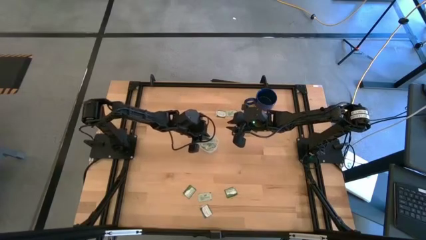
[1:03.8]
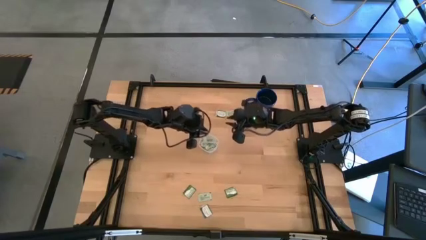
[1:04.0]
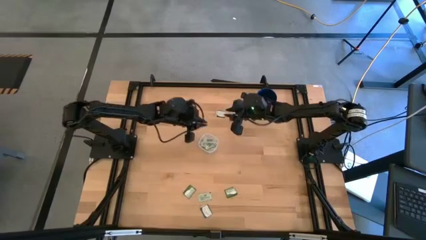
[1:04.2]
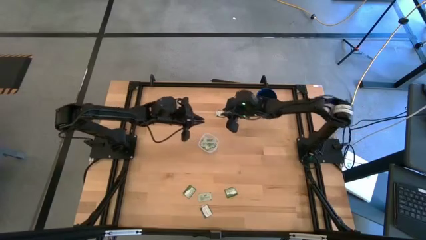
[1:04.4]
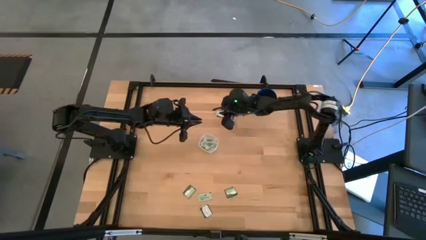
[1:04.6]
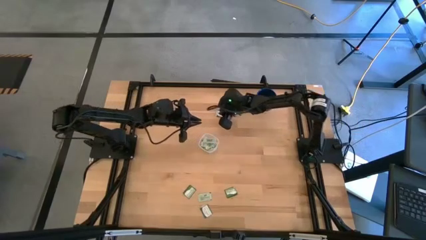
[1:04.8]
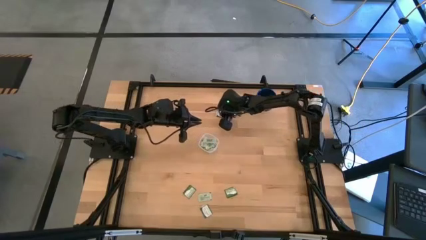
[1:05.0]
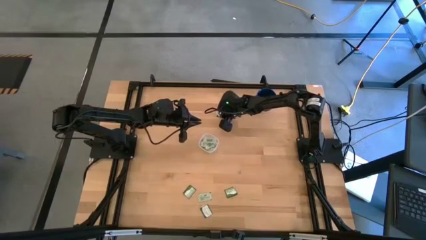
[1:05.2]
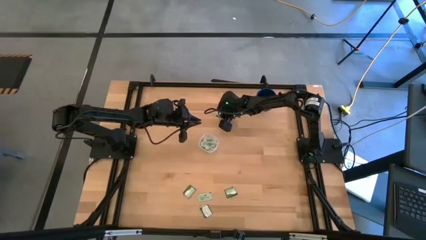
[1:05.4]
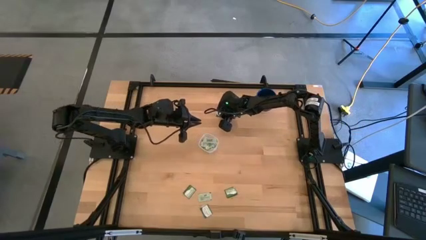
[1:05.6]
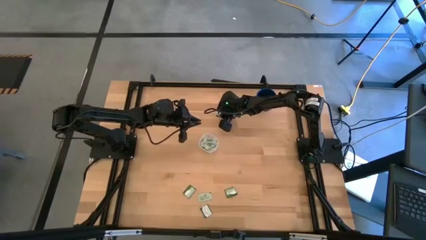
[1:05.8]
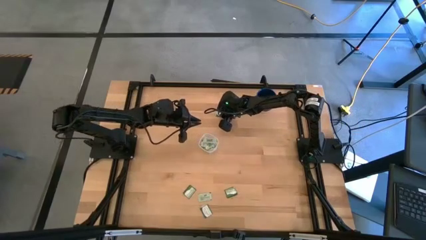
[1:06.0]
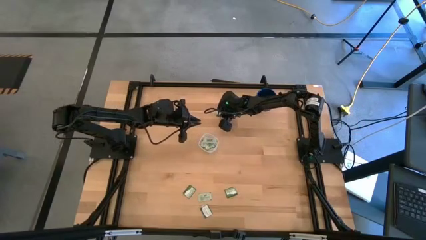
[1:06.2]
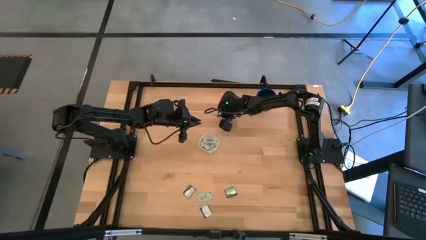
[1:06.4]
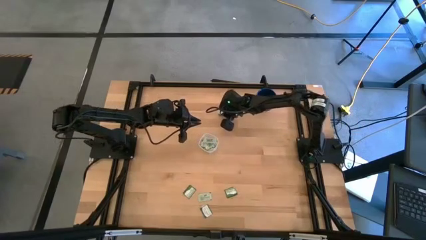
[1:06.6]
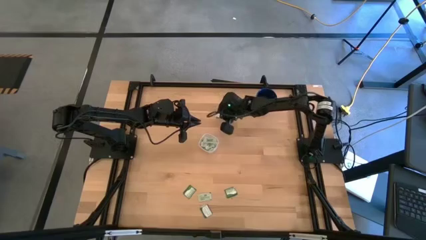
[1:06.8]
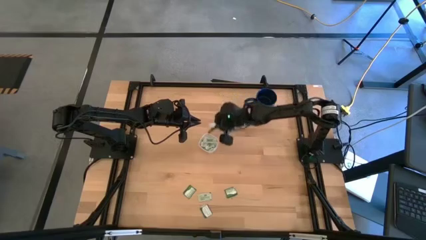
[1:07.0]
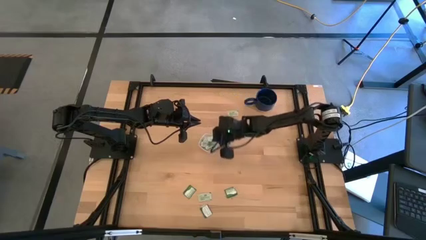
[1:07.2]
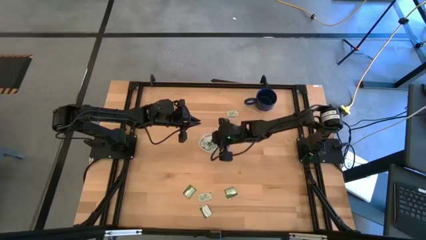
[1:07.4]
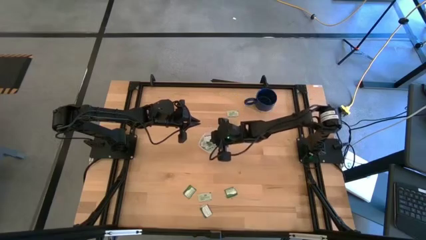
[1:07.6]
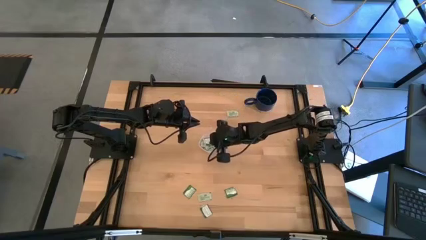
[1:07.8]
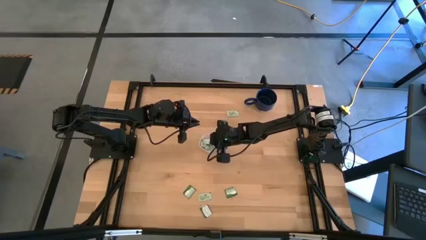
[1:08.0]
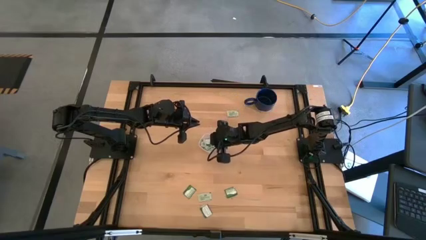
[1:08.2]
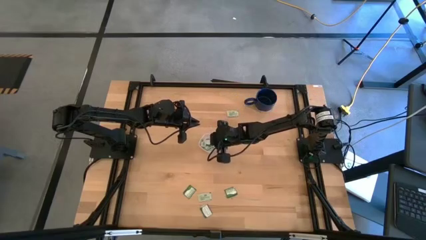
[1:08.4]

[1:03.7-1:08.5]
Task: Pick and place Stevia / Truvia into bins
Put the green stevia packet into the container

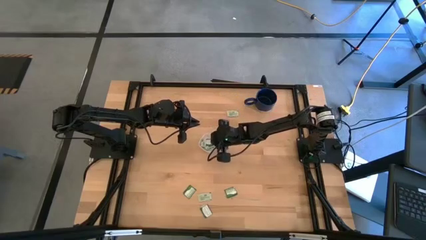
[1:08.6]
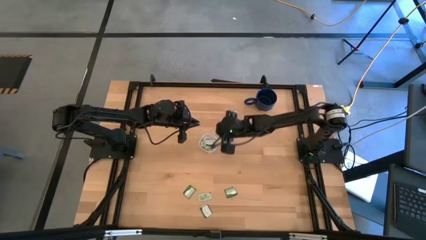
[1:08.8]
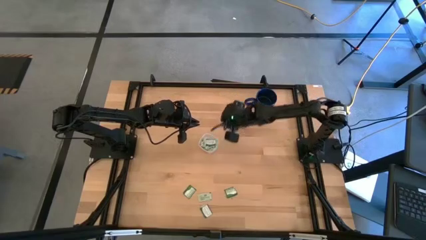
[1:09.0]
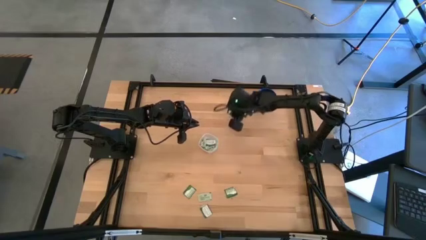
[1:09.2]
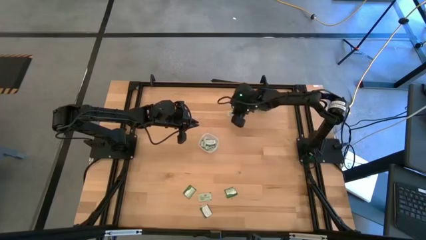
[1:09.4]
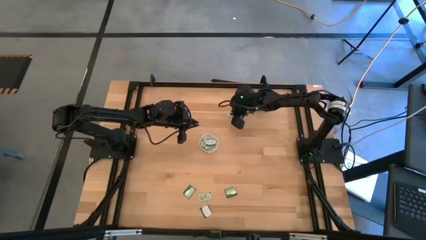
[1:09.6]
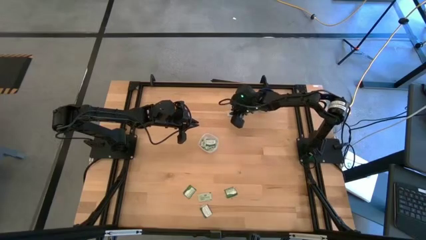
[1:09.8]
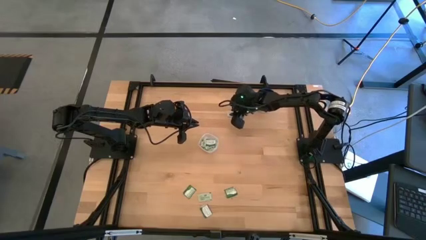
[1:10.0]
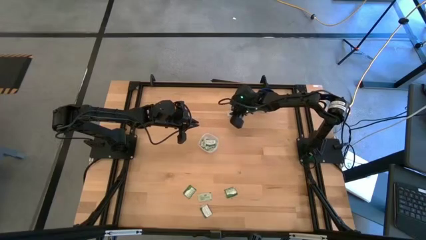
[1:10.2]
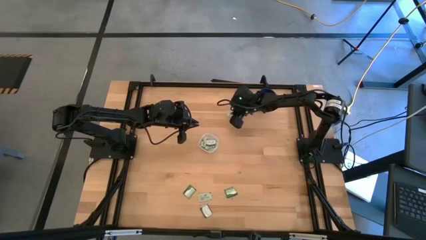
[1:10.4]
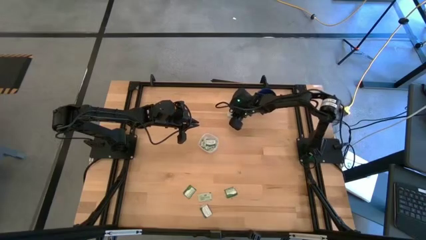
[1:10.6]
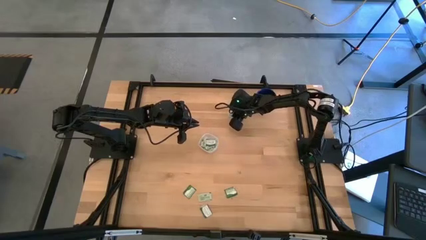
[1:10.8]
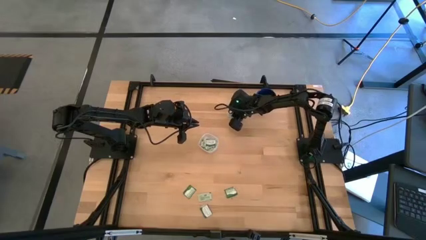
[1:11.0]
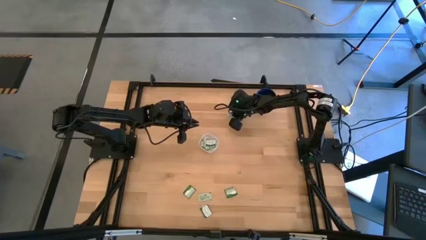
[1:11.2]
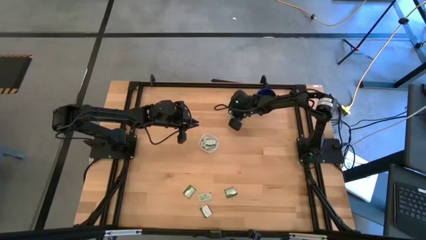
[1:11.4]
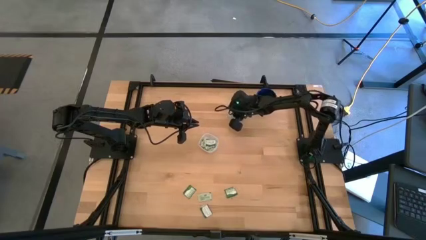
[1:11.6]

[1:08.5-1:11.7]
Put the top light green stevia packet into the container

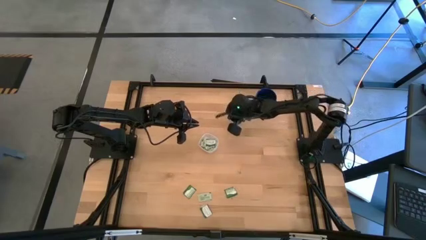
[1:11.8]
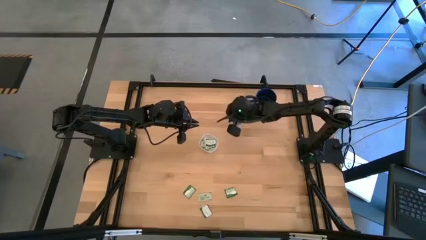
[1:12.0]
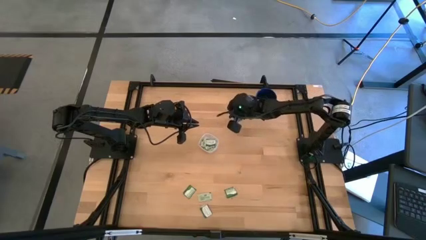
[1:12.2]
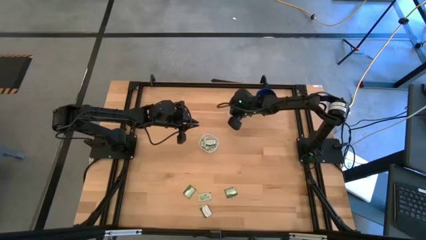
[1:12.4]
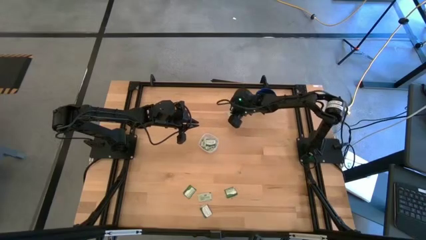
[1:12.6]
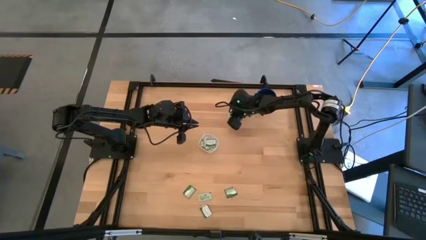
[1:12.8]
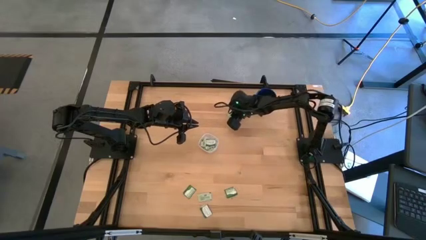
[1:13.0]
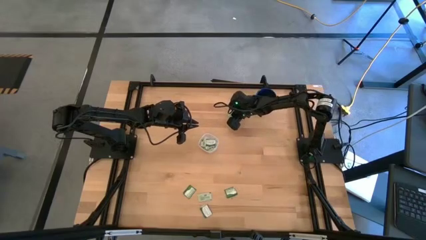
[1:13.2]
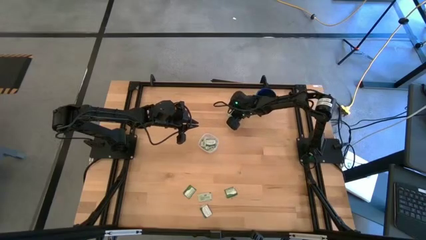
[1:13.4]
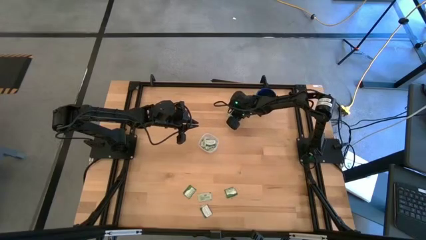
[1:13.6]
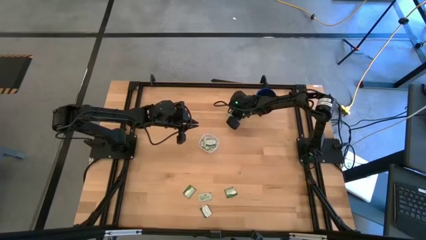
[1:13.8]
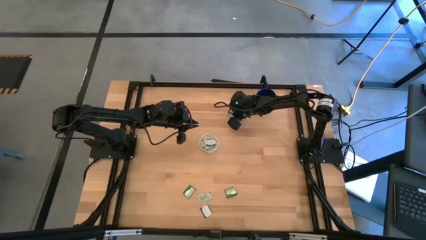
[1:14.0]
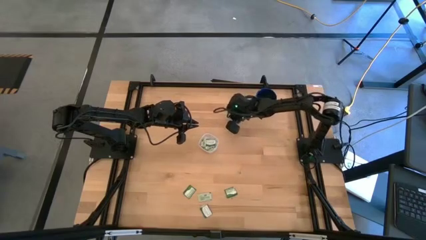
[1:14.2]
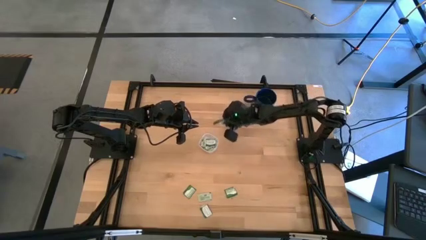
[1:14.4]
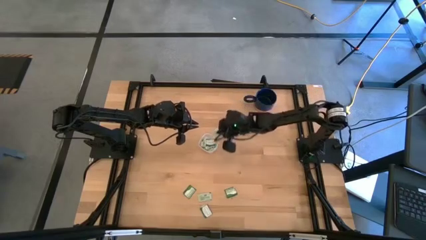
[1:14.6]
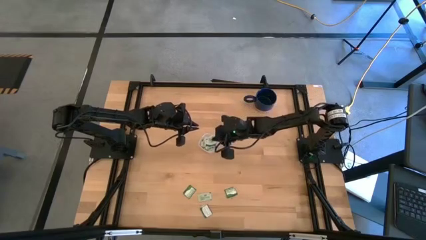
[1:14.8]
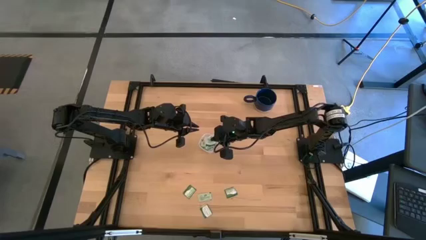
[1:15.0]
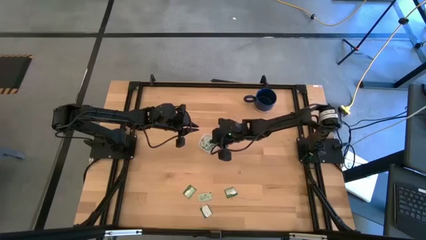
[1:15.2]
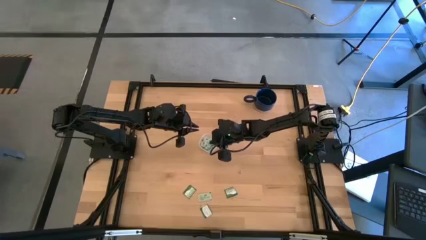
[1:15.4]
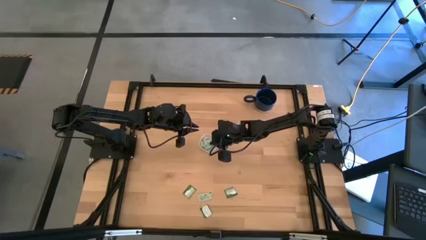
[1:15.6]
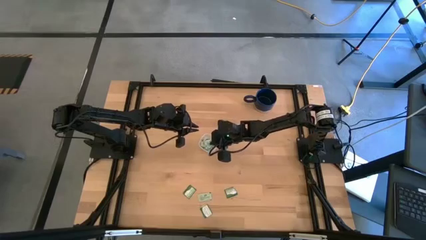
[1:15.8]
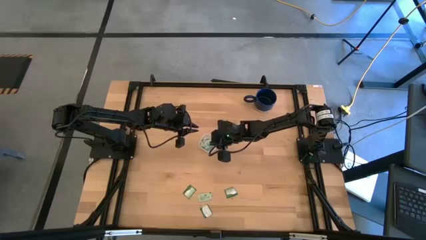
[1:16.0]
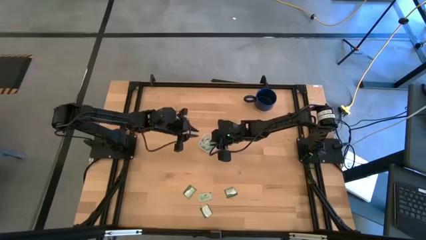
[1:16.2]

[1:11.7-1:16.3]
Put the top light green stevia packet into the container

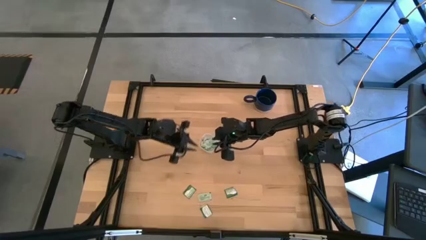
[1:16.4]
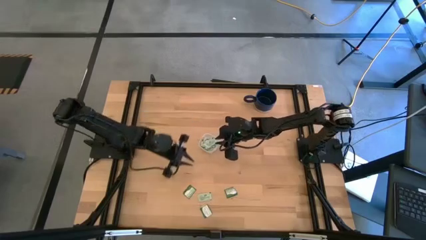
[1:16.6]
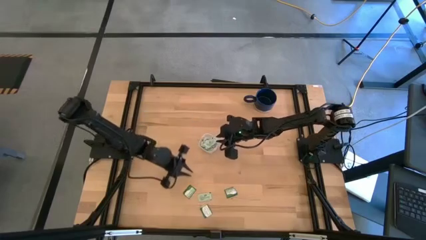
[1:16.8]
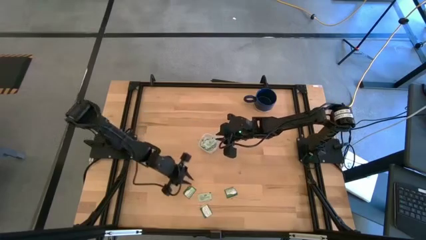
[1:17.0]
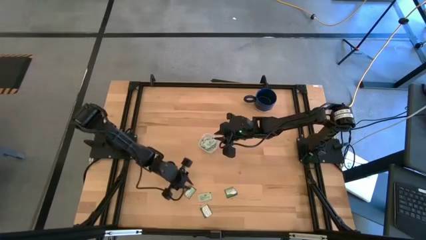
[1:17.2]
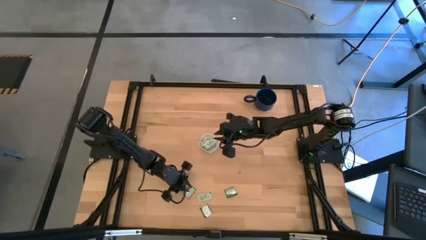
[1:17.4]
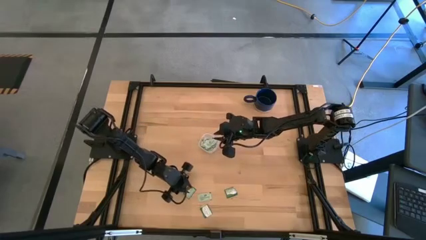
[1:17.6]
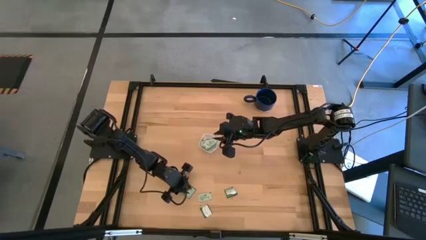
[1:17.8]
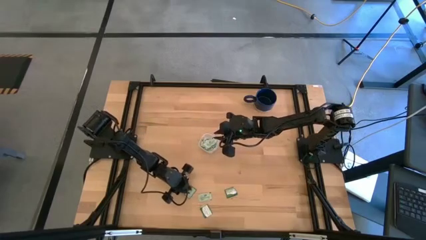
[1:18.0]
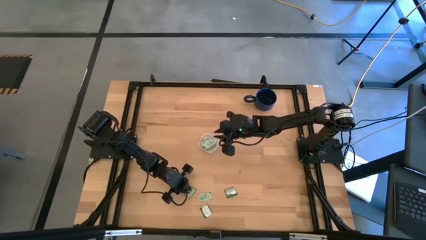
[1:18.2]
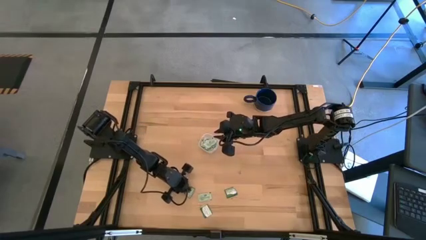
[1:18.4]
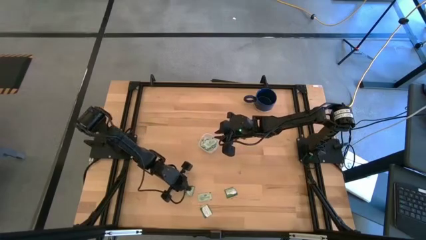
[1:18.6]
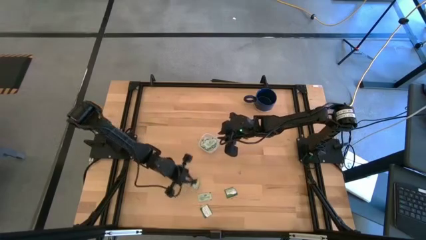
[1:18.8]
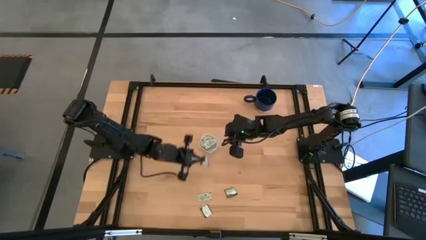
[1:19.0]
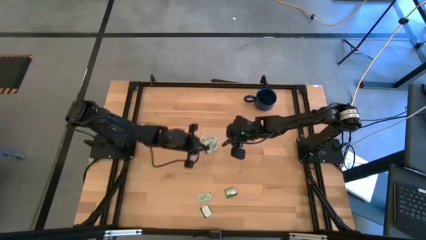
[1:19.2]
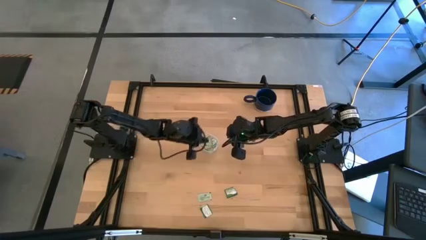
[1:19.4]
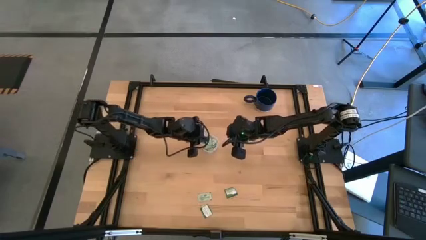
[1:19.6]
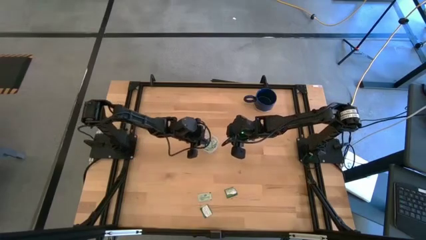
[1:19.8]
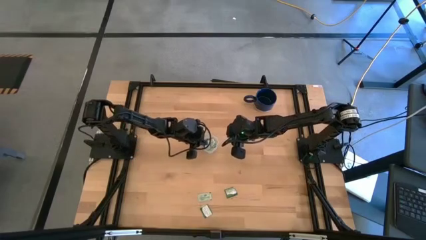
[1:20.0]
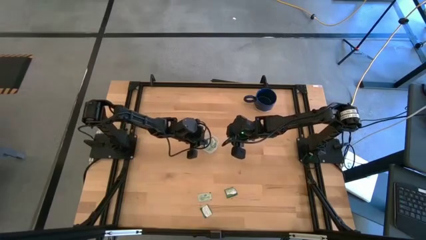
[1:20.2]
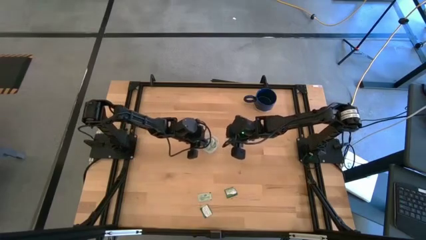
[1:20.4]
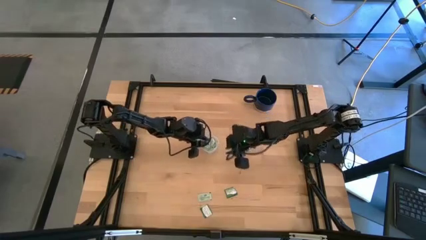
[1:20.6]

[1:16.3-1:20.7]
Put the top left green stevia packet into the container
